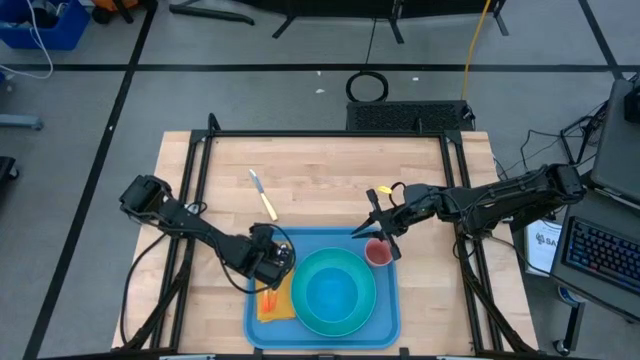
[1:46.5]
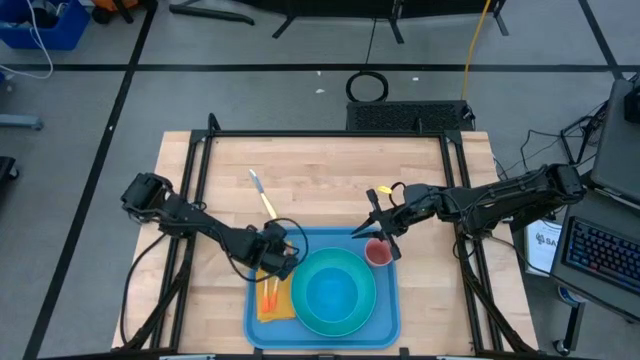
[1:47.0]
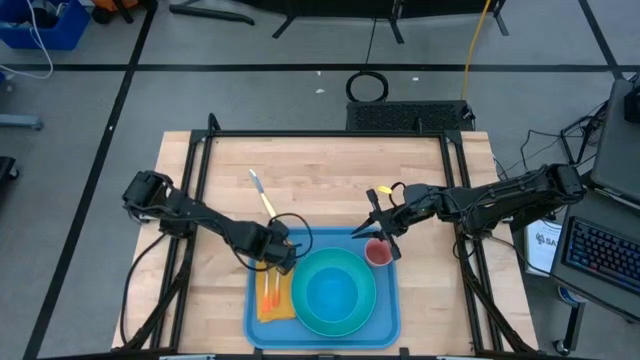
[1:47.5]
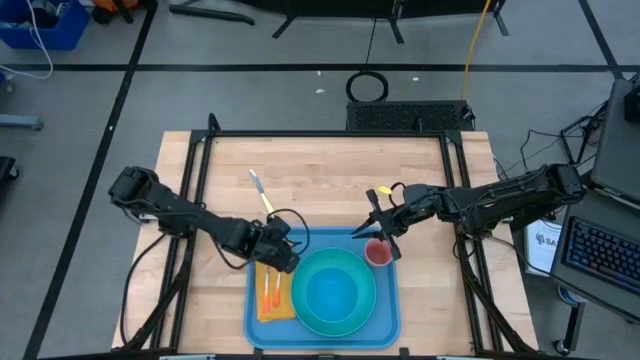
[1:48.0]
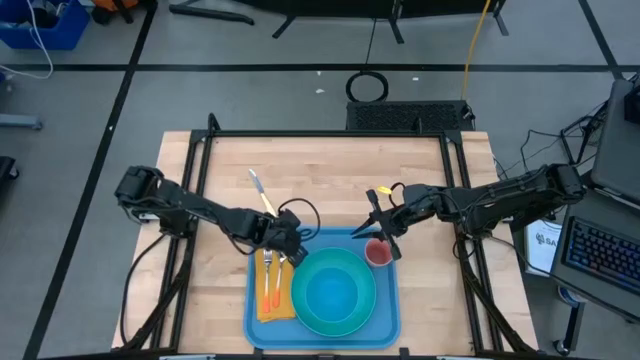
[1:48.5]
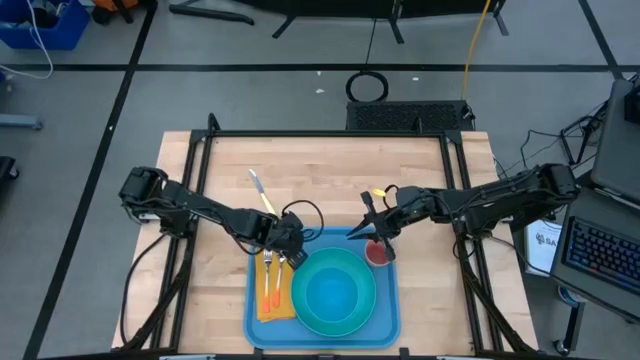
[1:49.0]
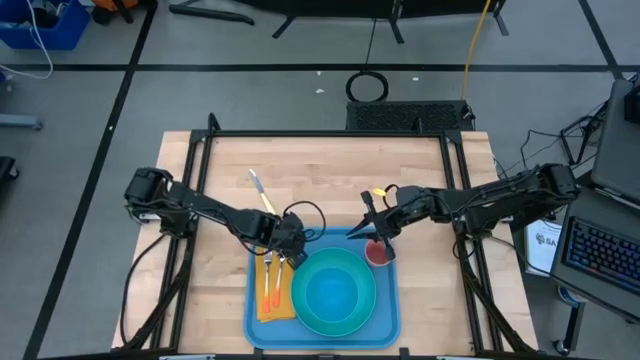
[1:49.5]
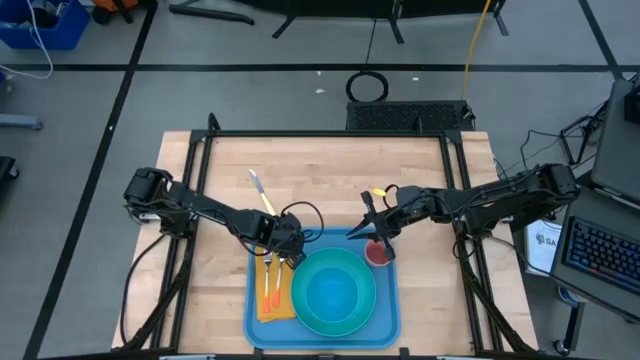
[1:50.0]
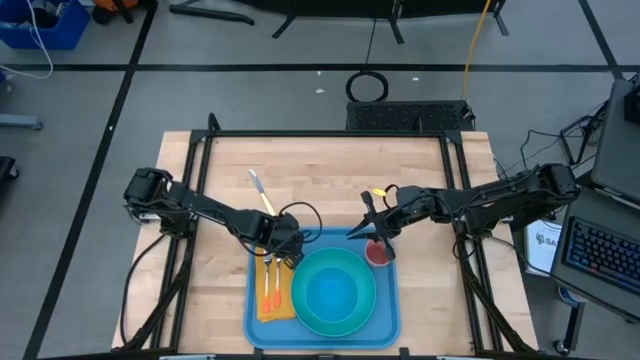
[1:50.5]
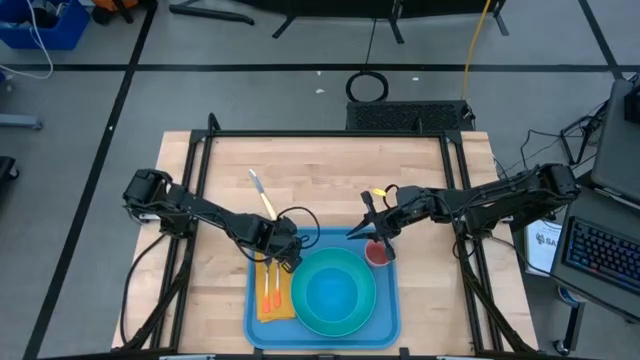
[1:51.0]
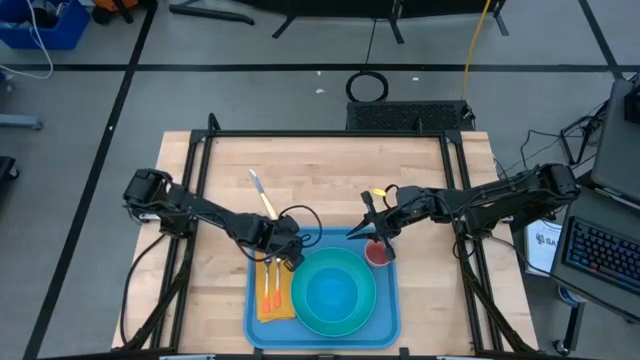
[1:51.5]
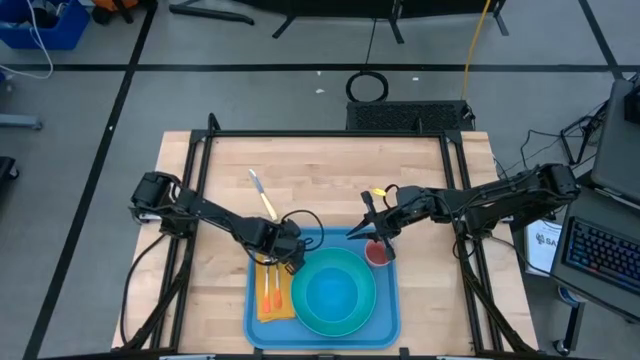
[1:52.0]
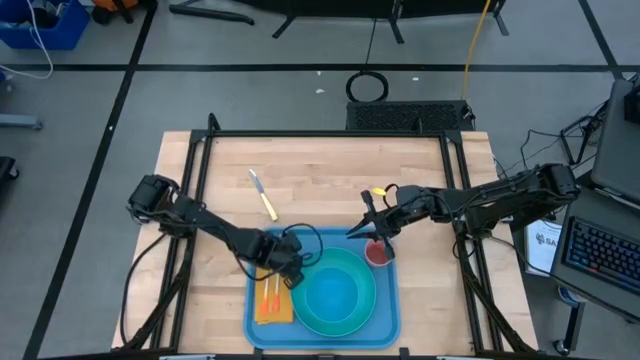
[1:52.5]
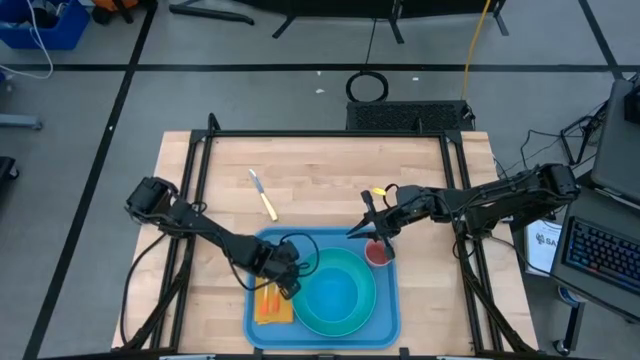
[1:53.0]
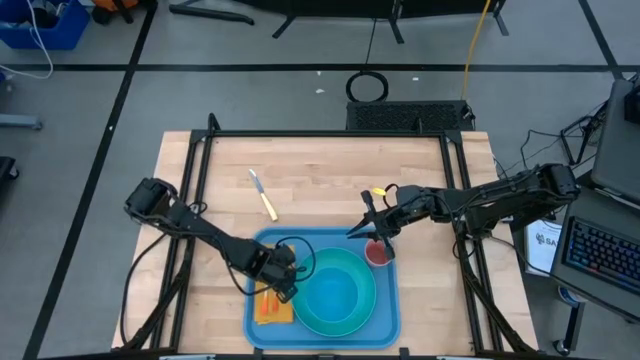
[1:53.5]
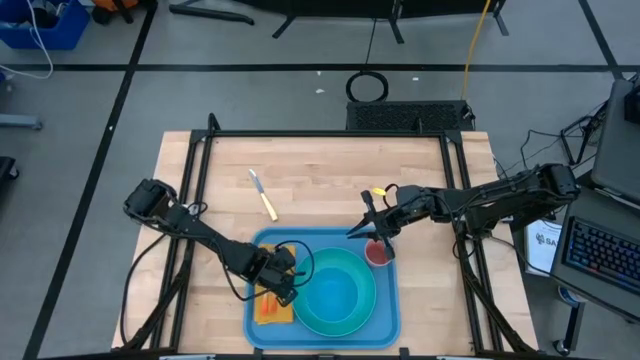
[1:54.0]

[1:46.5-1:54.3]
Task: Set up tray
Adjust the orange spoon on the yellow napkin

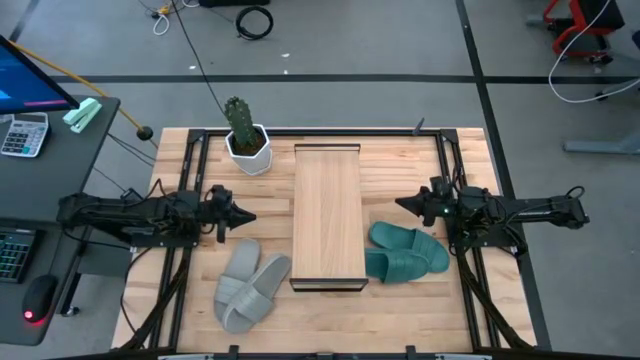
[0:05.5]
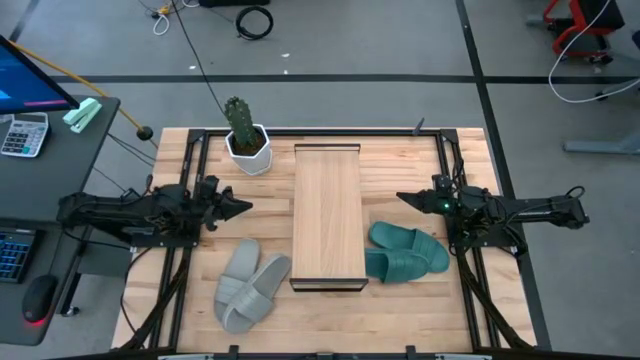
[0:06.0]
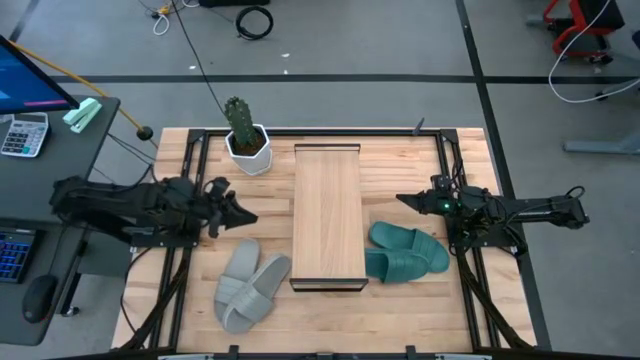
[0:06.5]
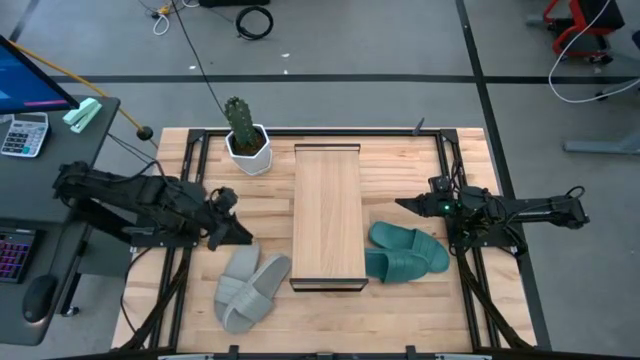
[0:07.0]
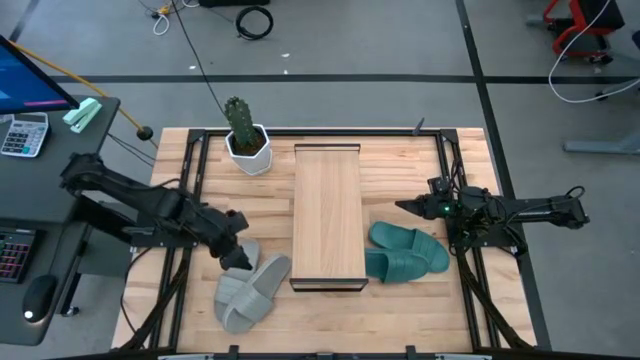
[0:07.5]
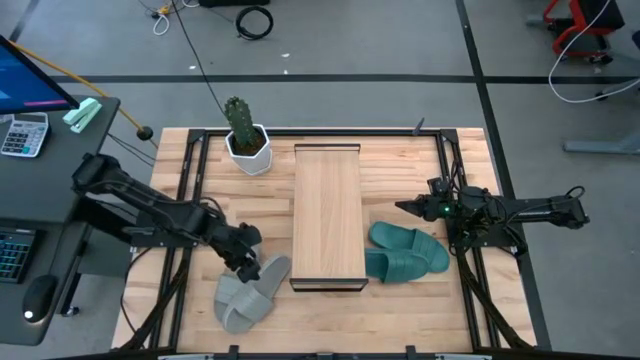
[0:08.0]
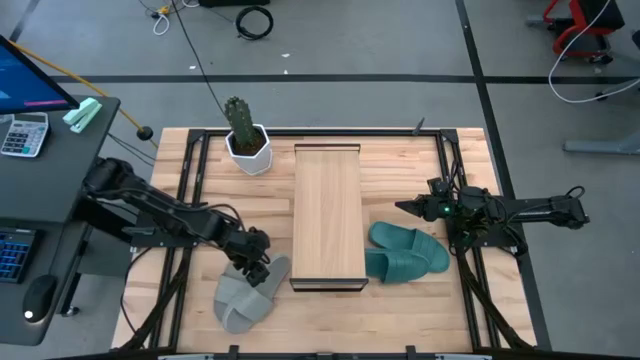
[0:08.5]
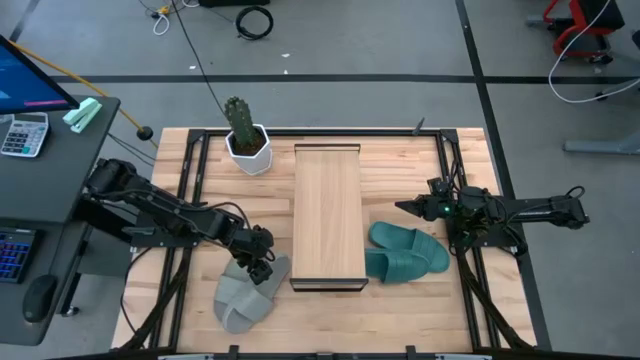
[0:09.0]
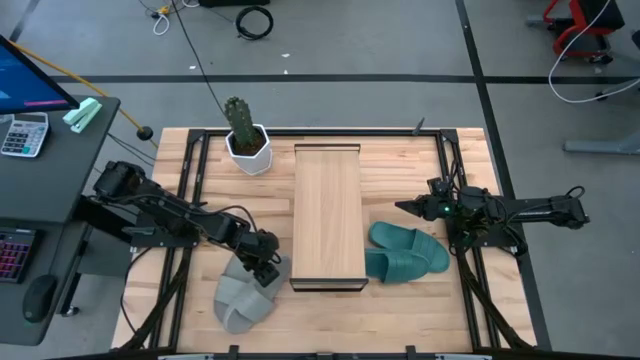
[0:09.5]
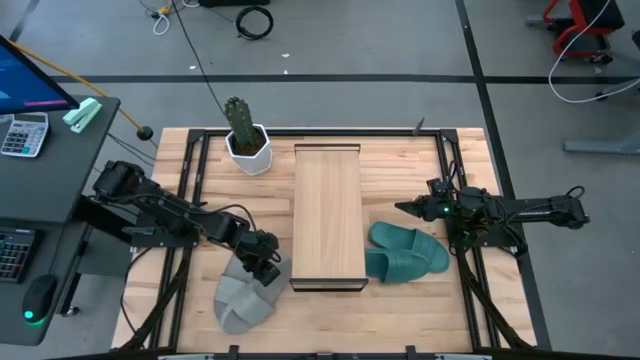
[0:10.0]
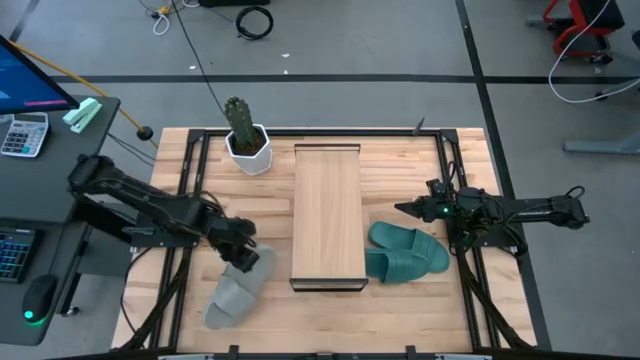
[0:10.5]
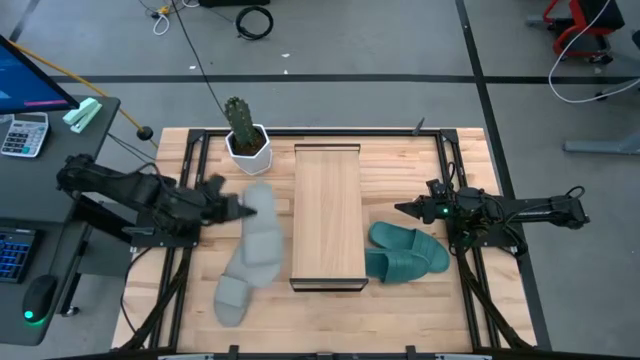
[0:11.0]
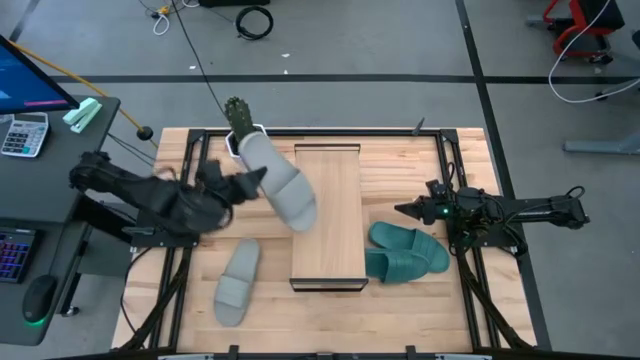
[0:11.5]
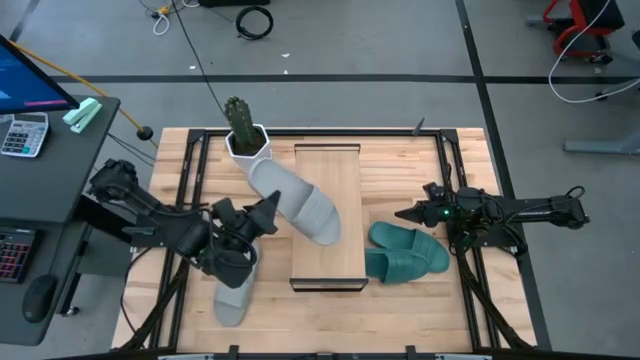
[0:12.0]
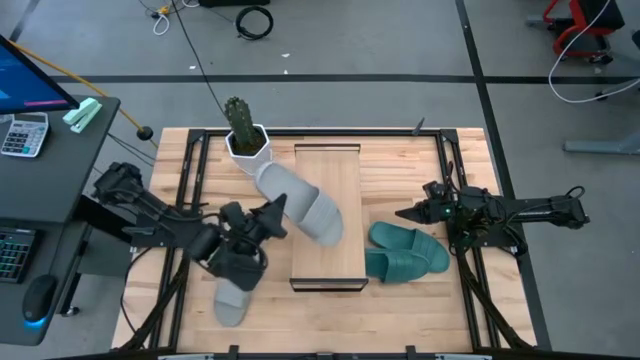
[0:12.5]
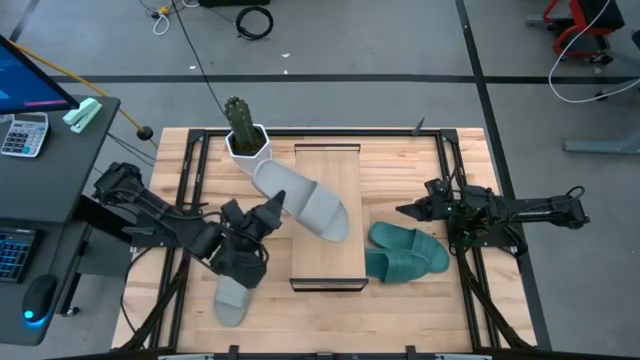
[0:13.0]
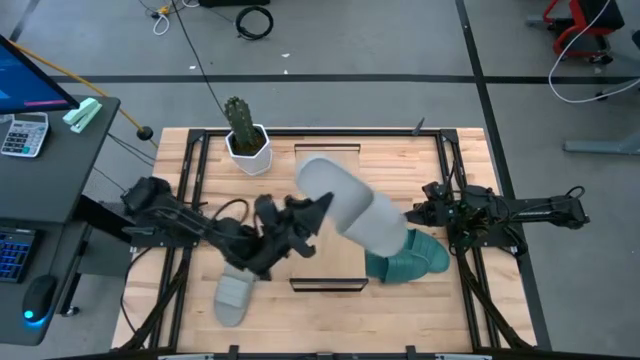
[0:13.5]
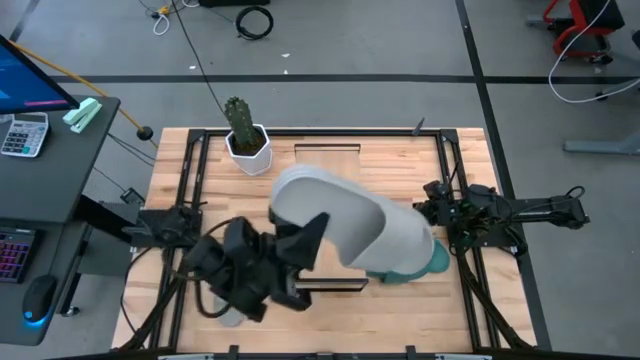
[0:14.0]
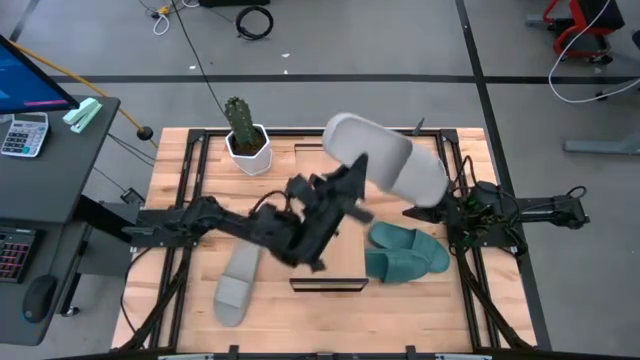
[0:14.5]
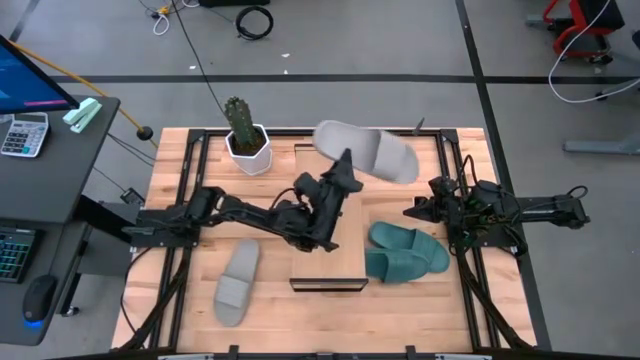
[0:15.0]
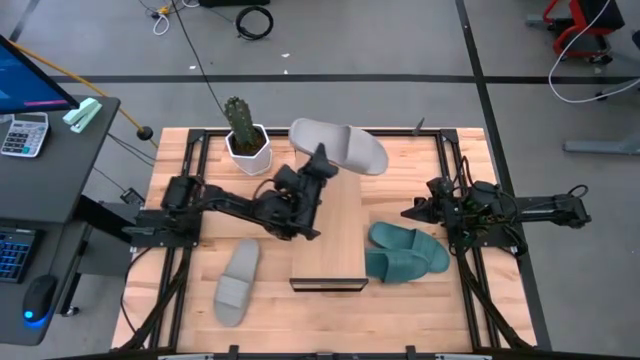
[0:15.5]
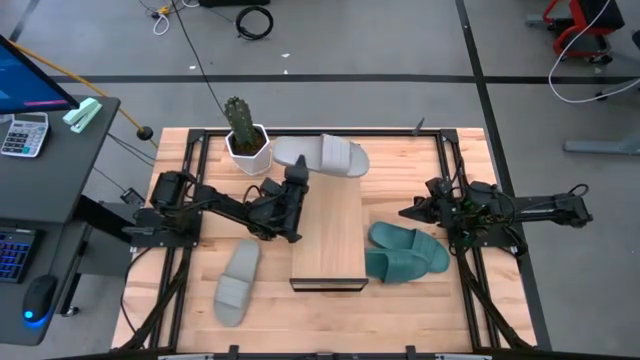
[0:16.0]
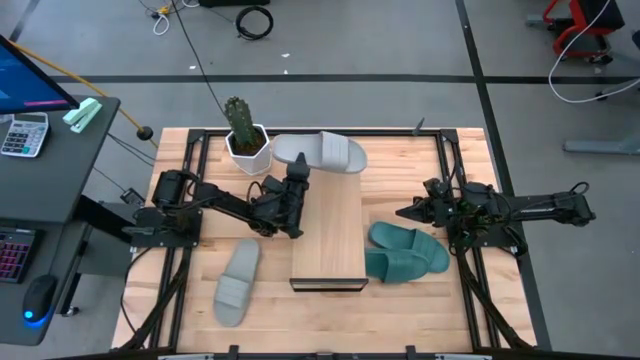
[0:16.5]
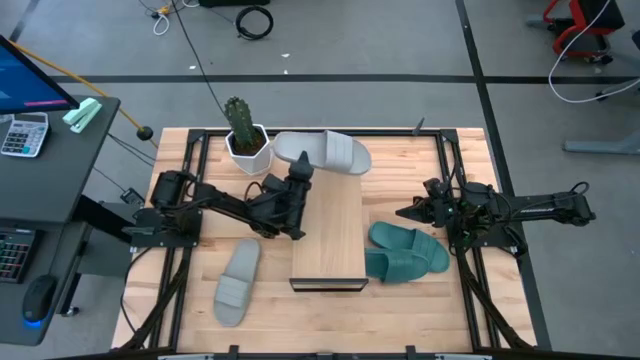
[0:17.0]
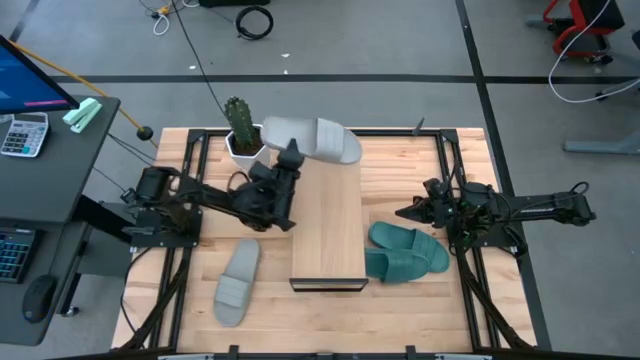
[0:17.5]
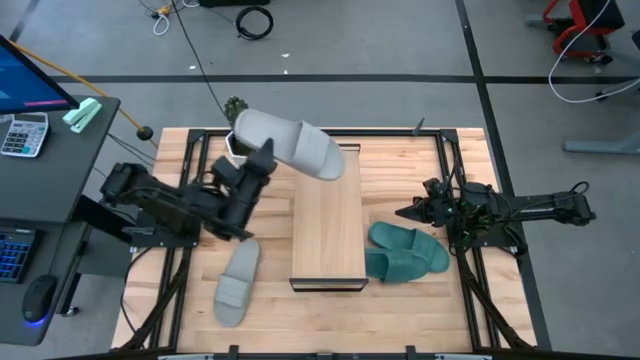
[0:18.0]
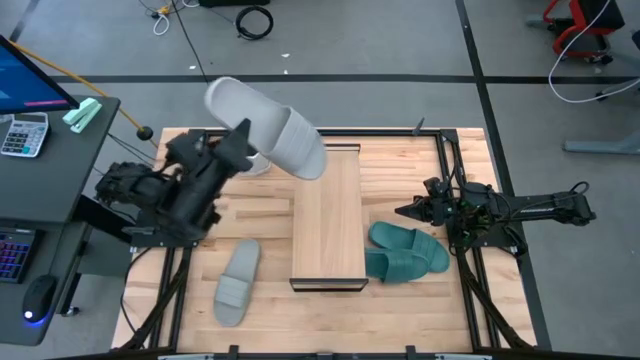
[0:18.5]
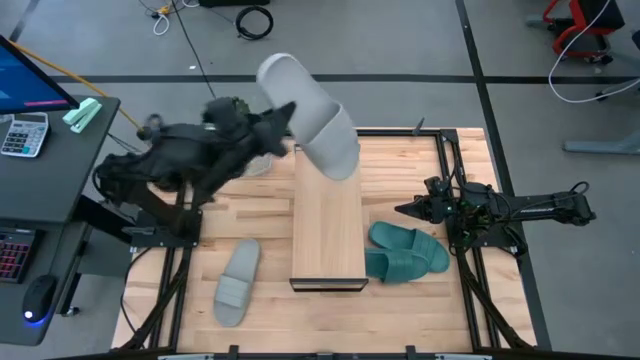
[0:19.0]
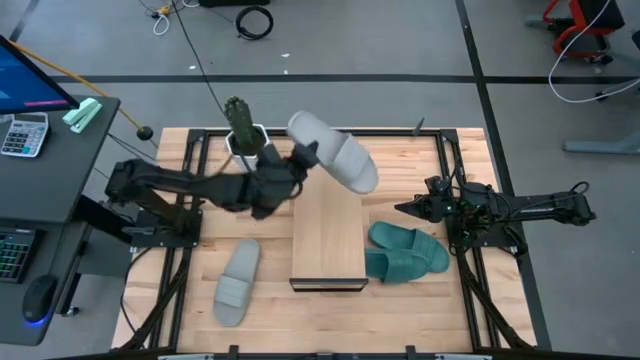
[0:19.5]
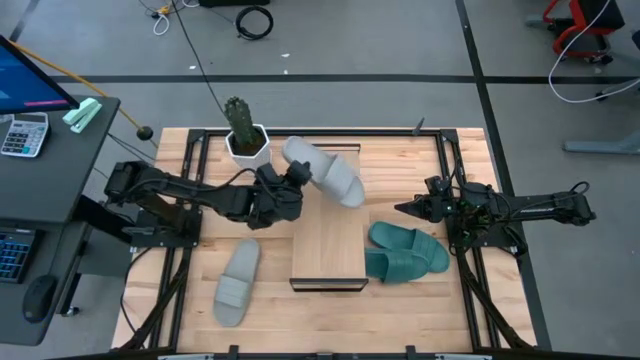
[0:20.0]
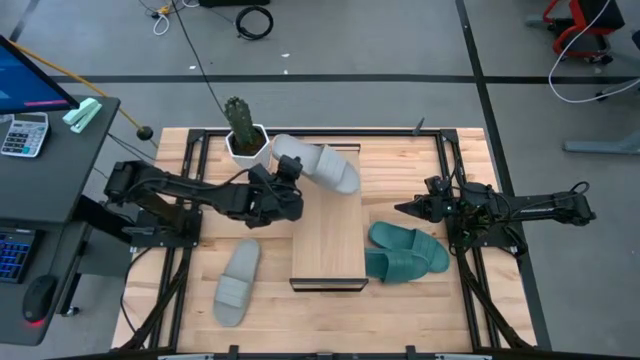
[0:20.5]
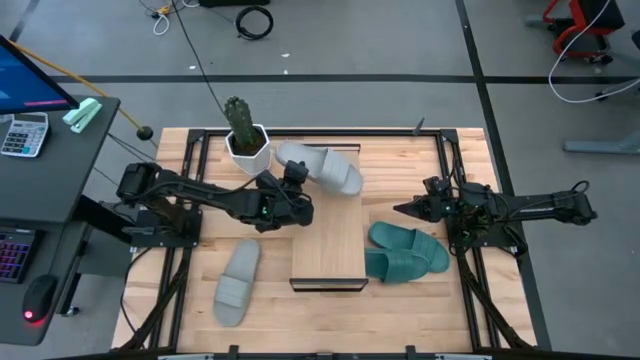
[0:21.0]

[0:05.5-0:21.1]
Task: Pick and place slides into the shelf
Put the right gray slipper onto the shelf
